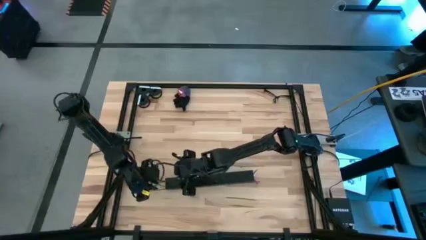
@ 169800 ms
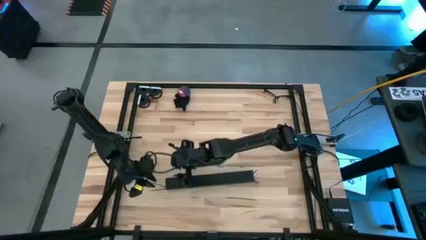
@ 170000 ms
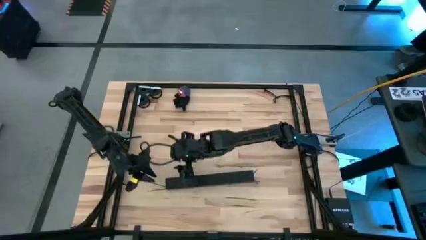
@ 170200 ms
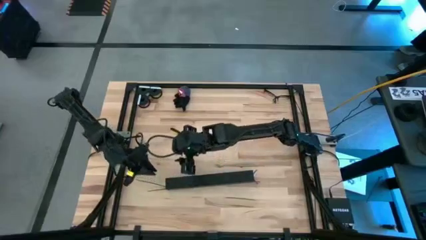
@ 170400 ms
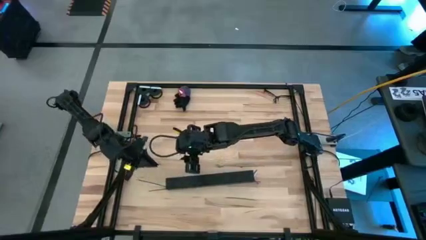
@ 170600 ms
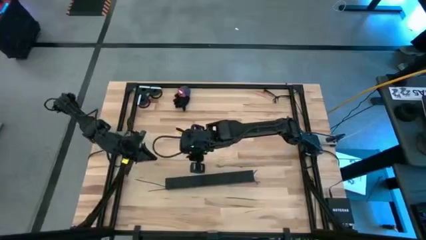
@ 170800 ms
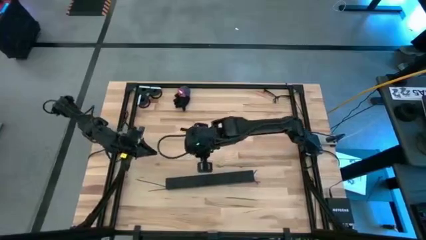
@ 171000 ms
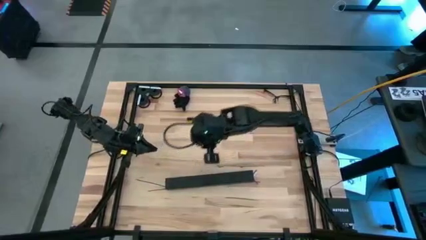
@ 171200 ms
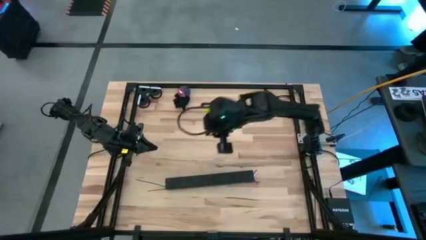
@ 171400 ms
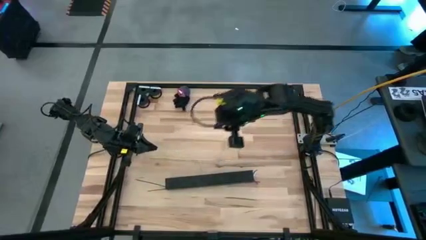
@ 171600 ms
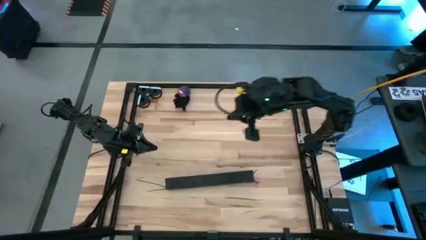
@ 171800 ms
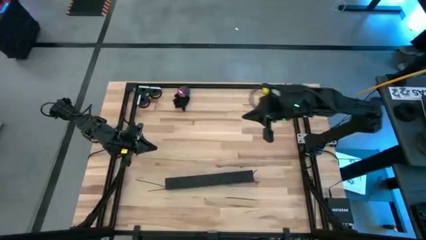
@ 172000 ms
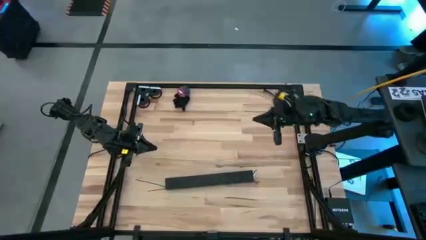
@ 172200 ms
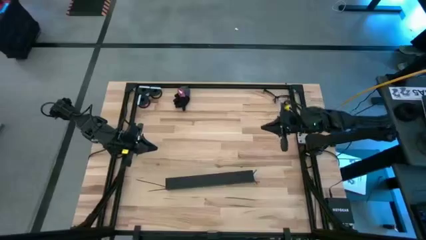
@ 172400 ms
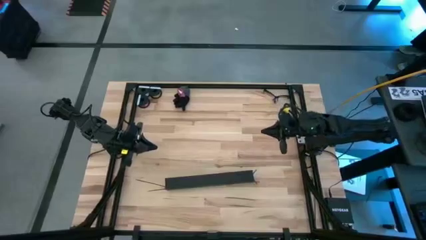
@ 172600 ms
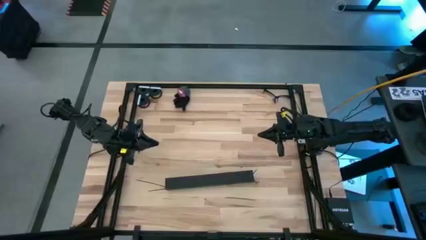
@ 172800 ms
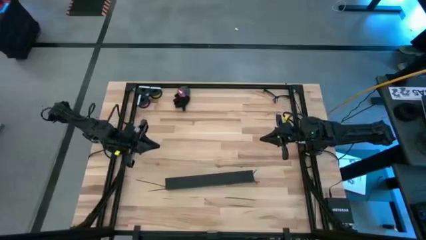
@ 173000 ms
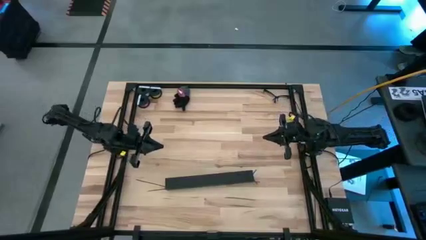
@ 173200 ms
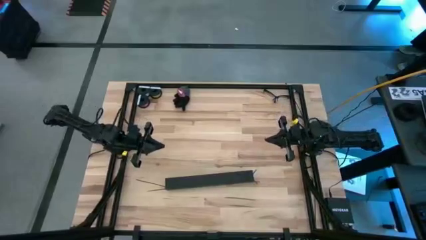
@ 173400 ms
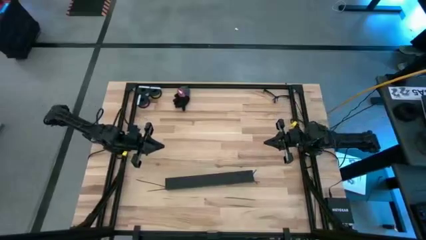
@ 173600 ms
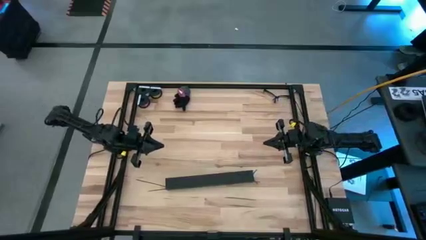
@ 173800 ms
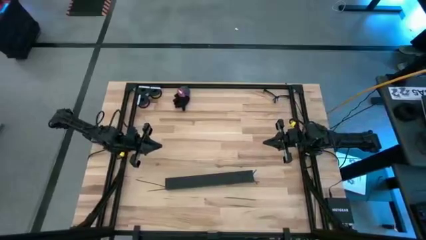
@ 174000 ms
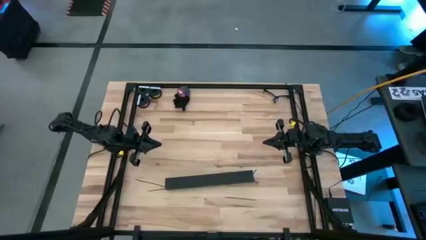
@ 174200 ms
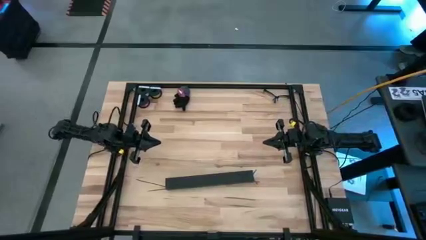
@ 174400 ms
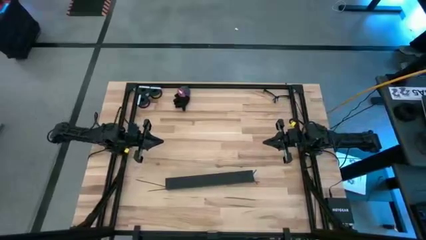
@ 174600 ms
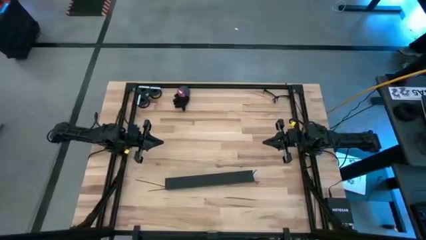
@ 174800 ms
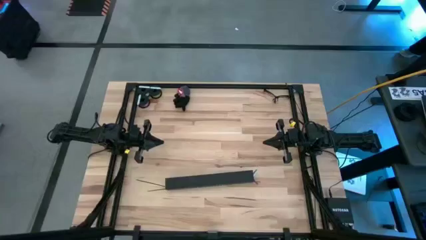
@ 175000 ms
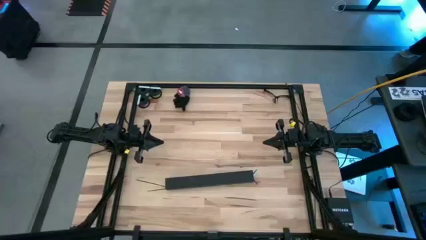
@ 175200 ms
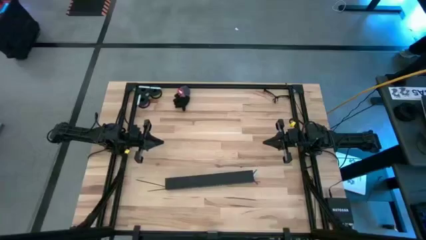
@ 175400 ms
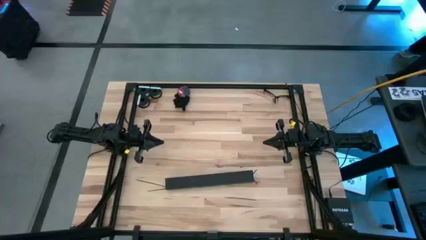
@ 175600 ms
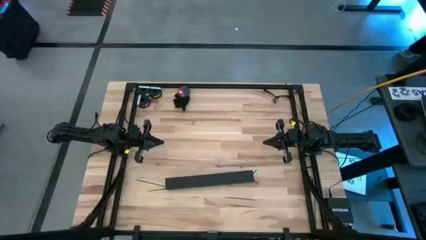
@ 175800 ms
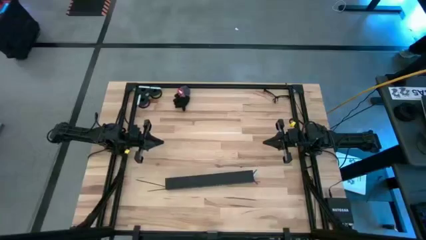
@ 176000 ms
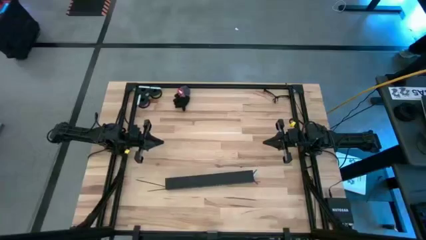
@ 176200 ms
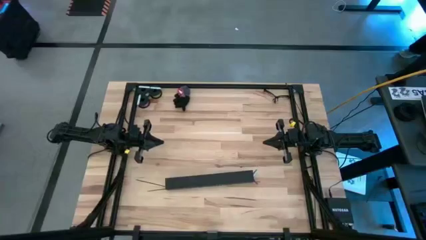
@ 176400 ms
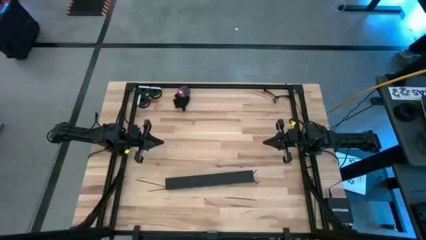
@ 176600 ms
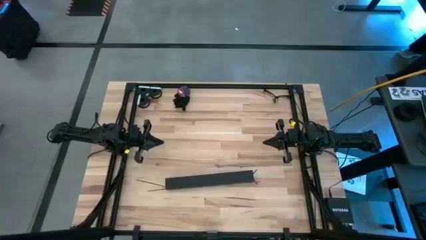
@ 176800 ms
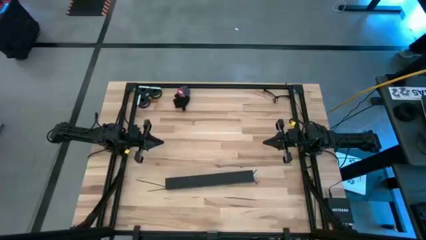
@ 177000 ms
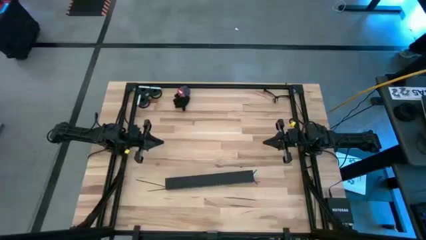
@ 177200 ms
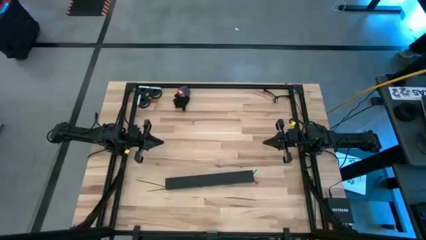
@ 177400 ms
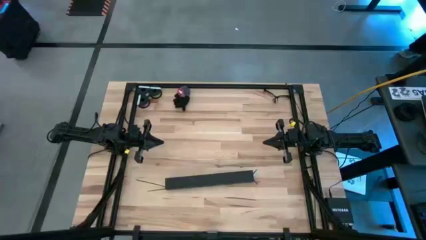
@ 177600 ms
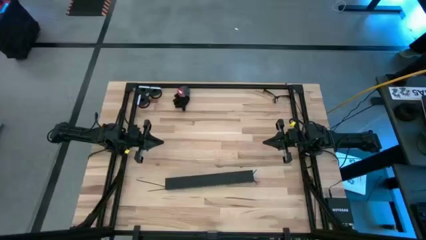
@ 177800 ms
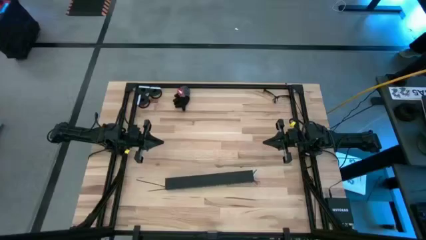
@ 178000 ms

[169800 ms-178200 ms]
Task: Ziptie cables
Return to Home Position
